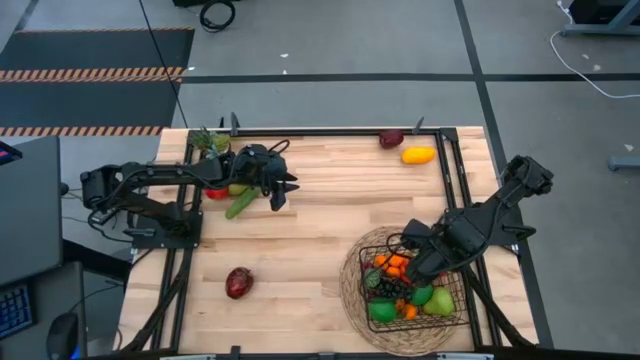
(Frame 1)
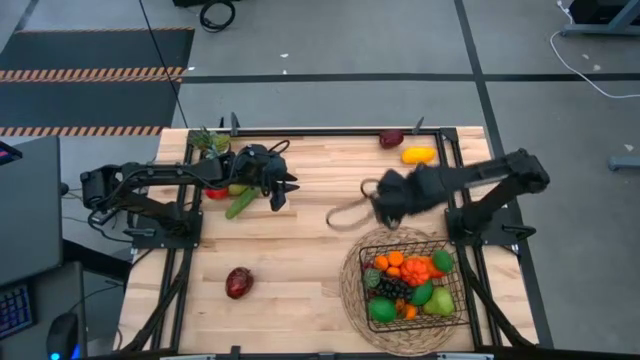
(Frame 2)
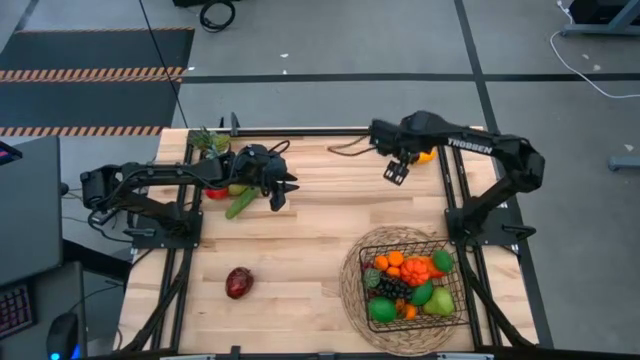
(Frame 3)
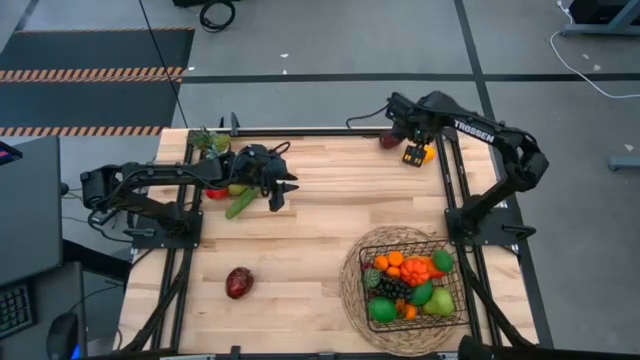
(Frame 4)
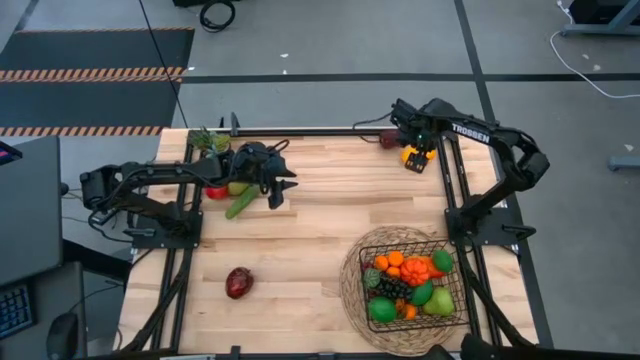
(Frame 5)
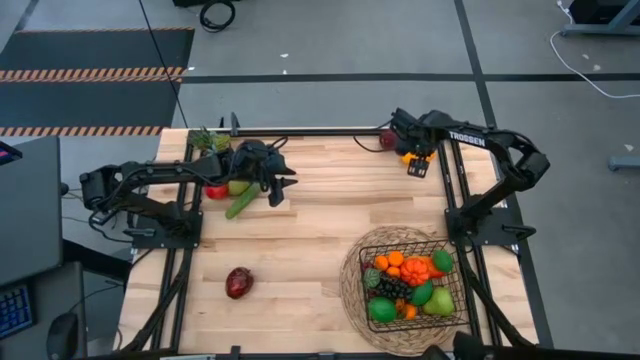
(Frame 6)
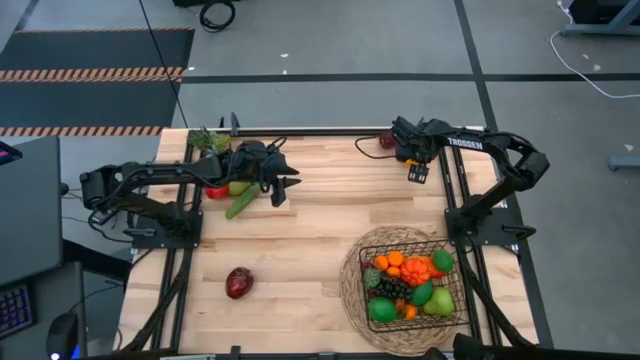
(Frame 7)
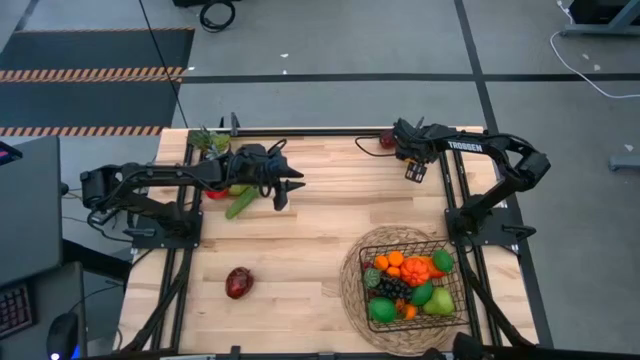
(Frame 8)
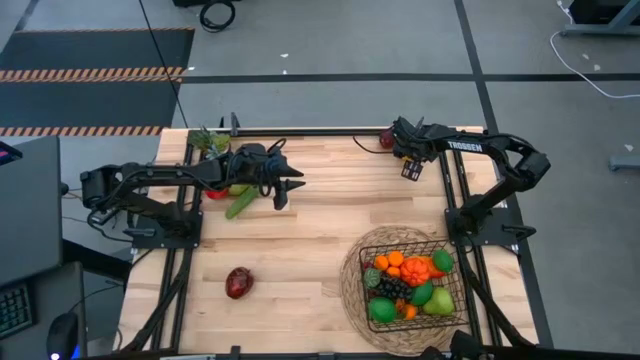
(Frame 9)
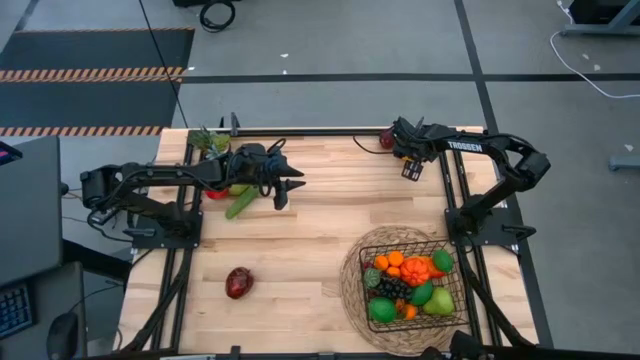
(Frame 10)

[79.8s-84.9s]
Task: Build produce basket
Put the yellow mango into the black wire basket

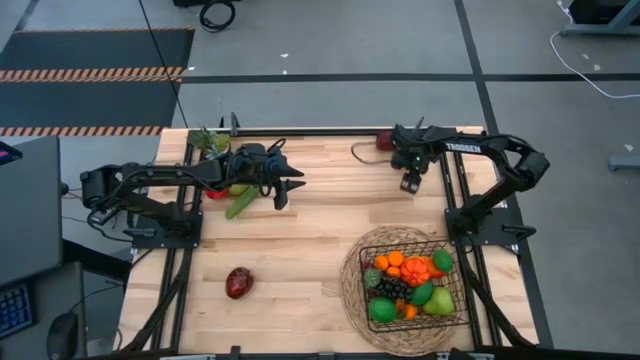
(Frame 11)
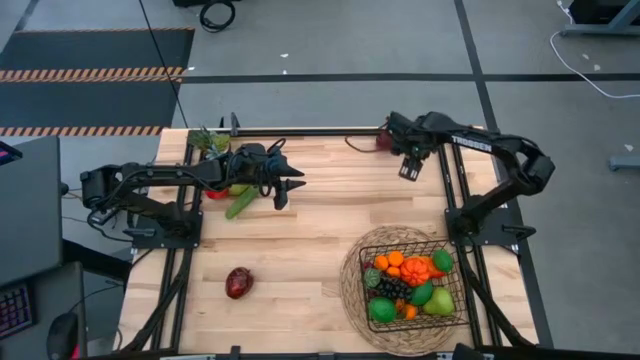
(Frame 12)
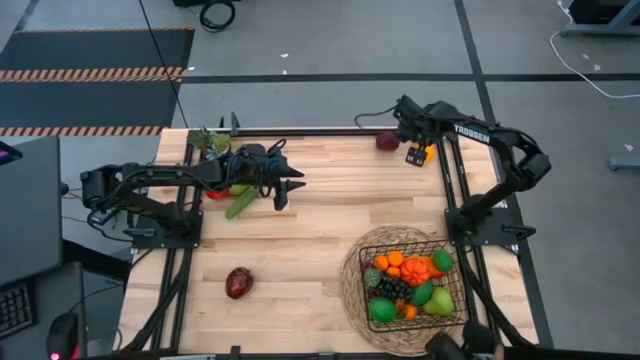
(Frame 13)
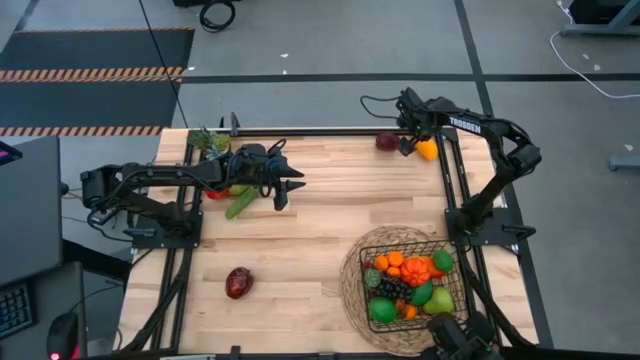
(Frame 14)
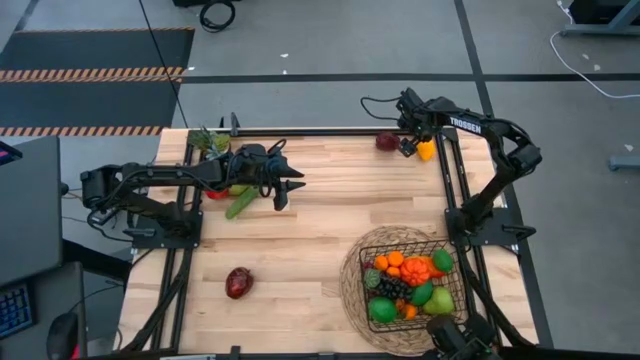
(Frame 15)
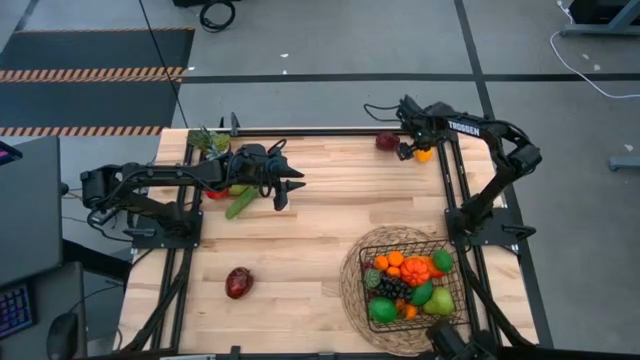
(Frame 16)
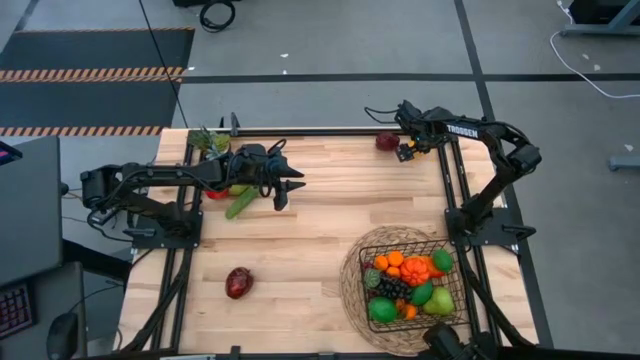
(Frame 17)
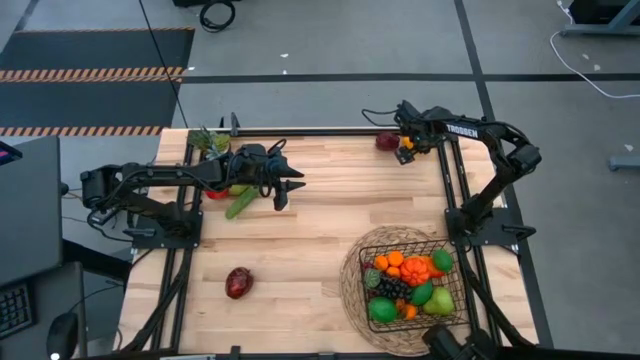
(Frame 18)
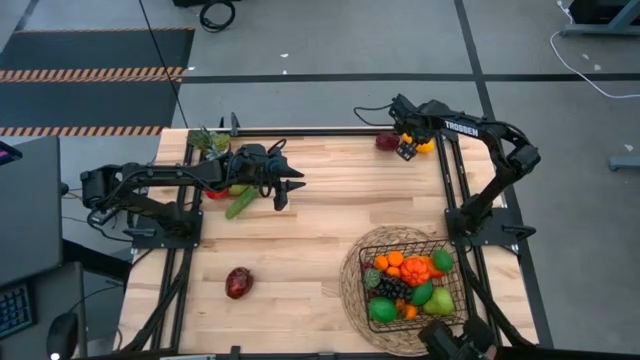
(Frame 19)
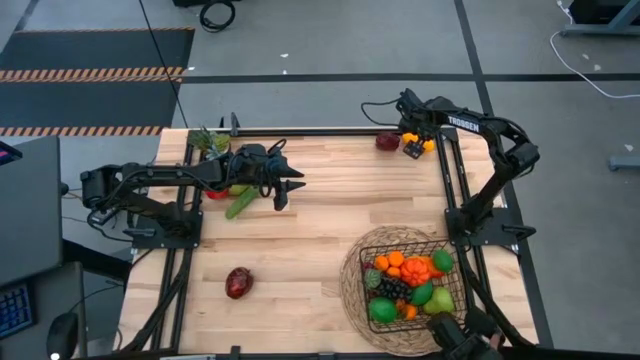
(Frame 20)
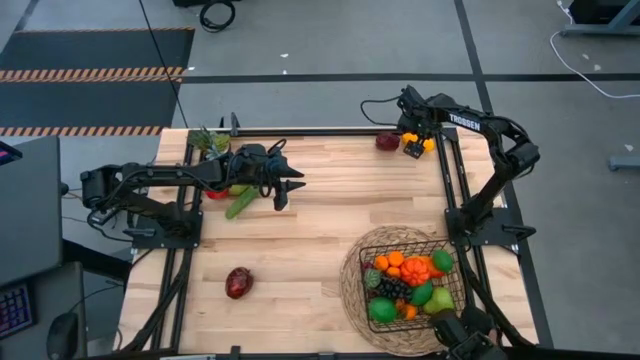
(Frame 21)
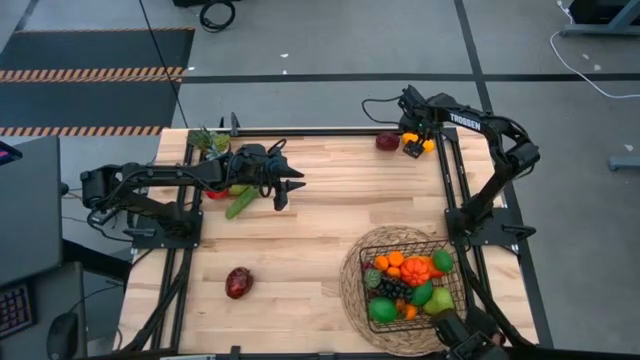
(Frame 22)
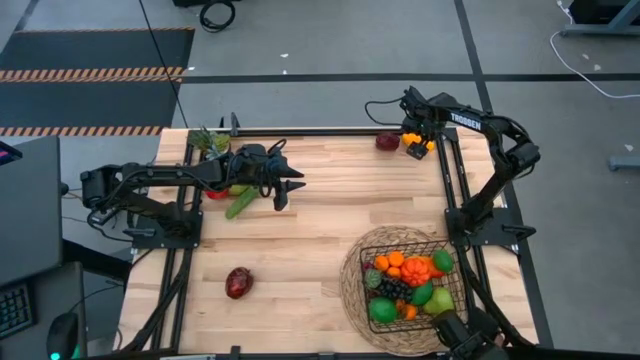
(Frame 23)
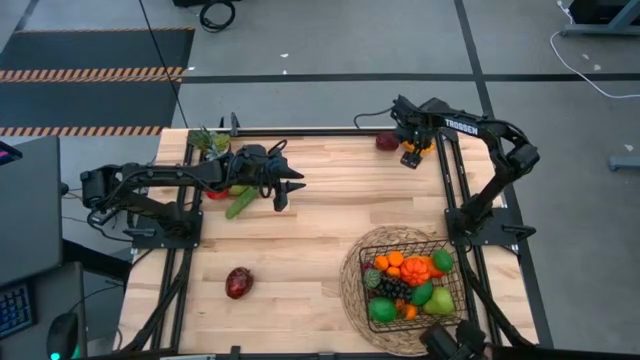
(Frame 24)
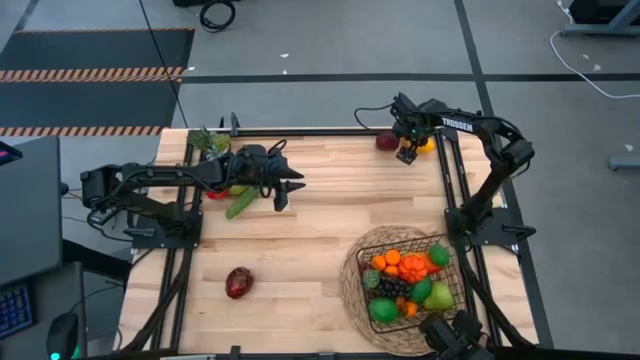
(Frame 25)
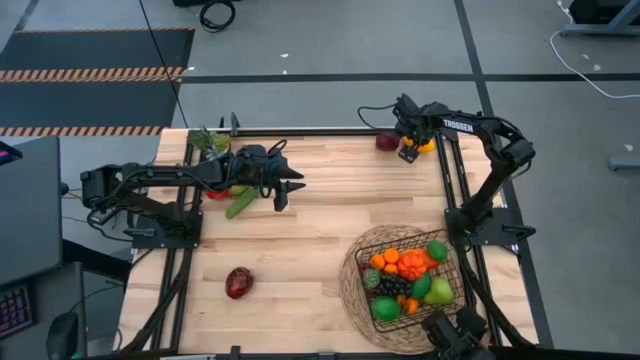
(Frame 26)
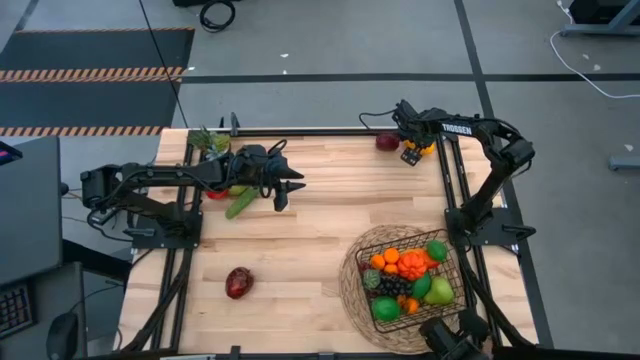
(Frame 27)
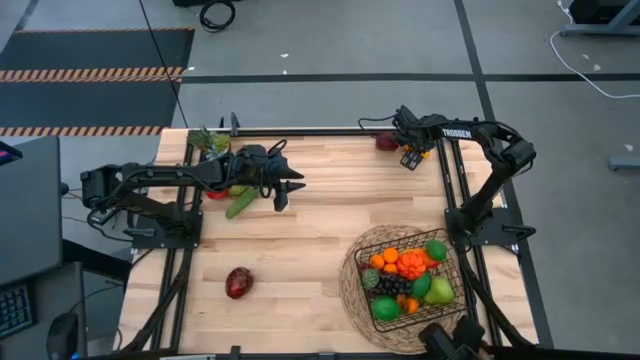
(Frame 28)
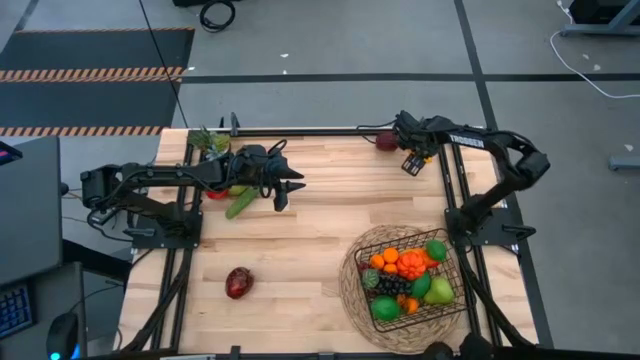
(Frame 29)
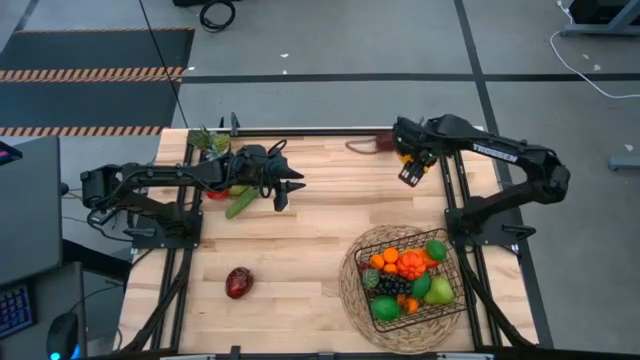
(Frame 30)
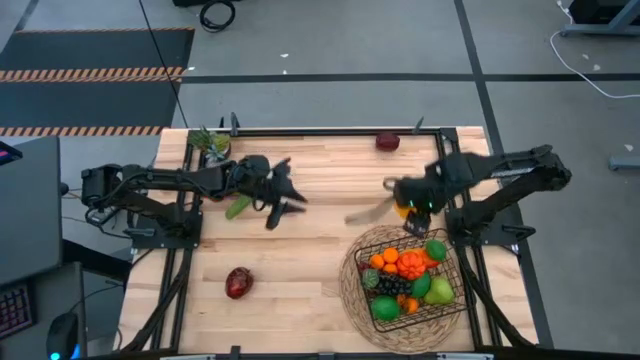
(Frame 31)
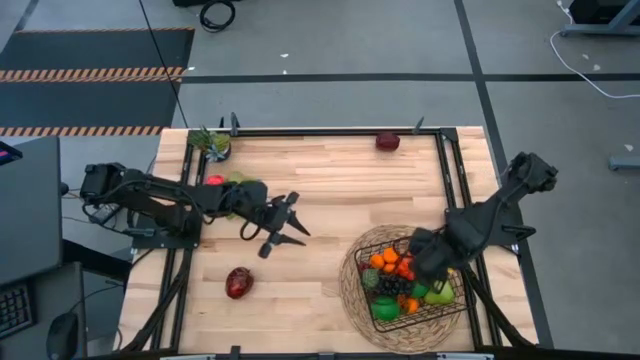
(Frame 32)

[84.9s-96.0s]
Put the yellow mango into the black wire basket

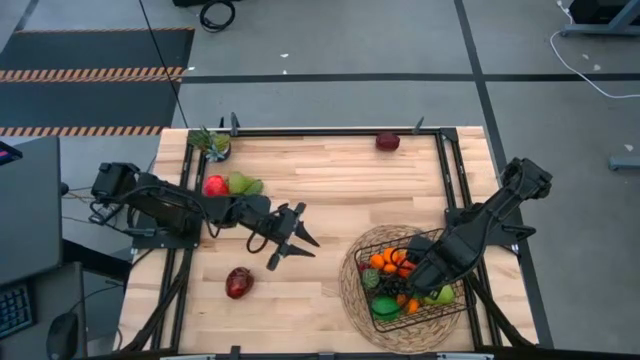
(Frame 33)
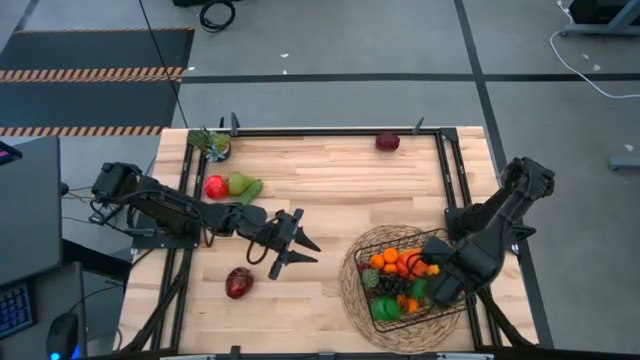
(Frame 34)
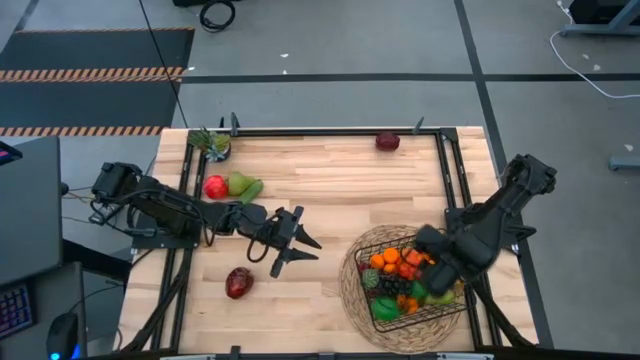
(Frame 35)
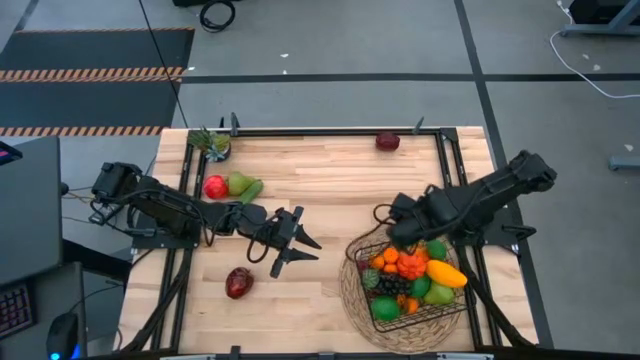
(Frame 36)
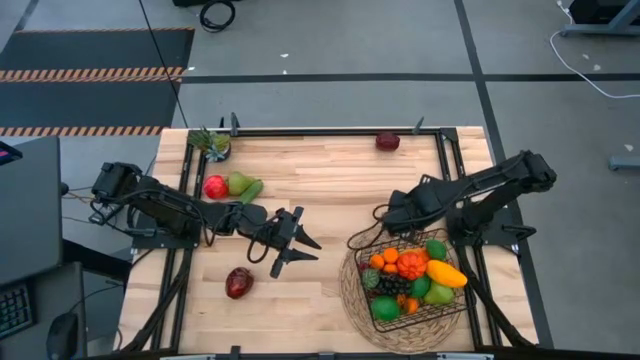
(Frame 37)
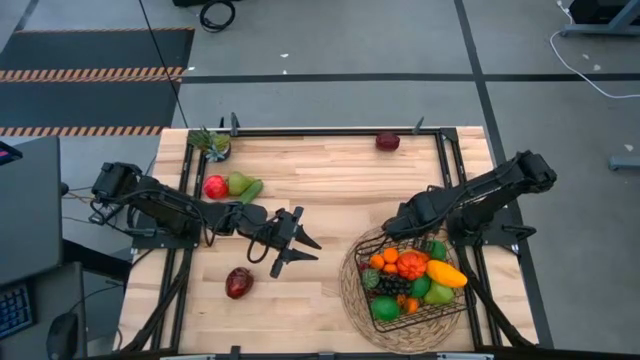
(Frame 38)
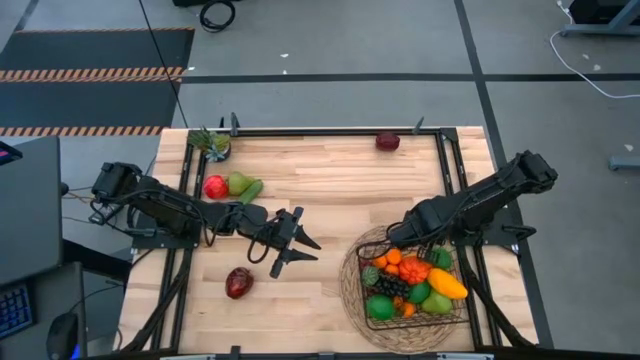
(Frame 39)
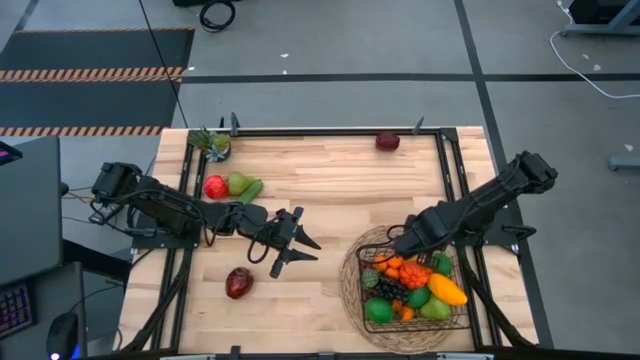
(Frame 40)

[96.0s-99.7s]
Adjust the black wire basket

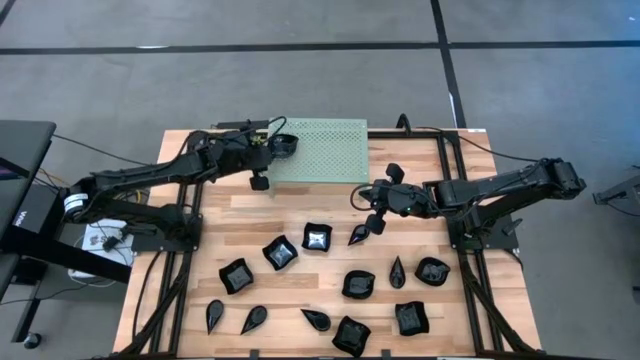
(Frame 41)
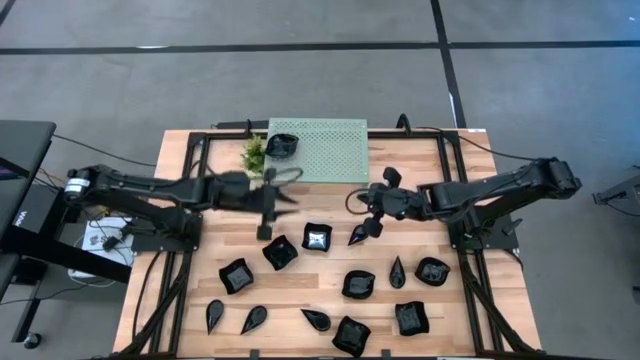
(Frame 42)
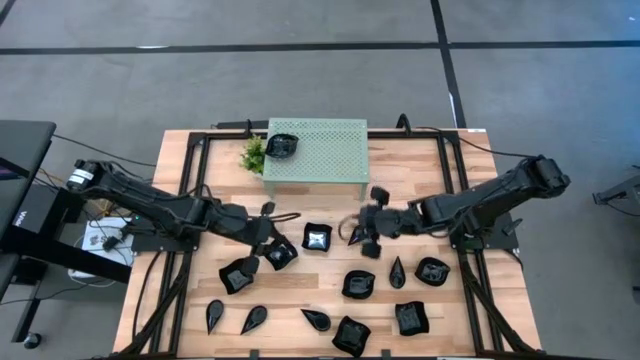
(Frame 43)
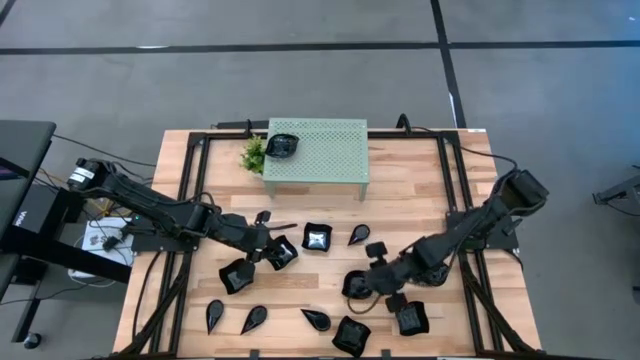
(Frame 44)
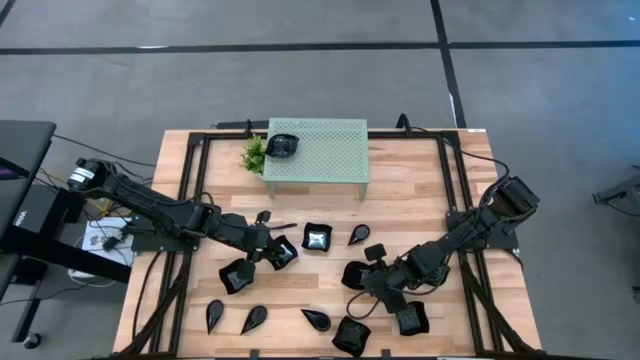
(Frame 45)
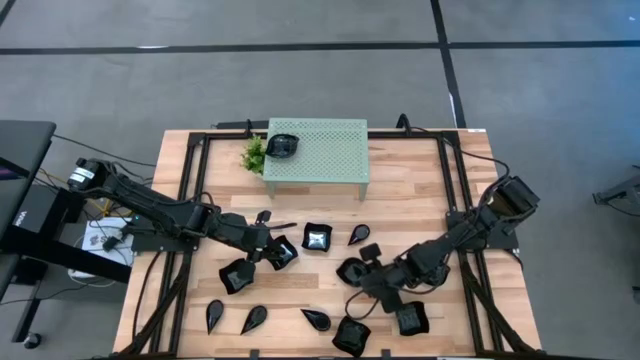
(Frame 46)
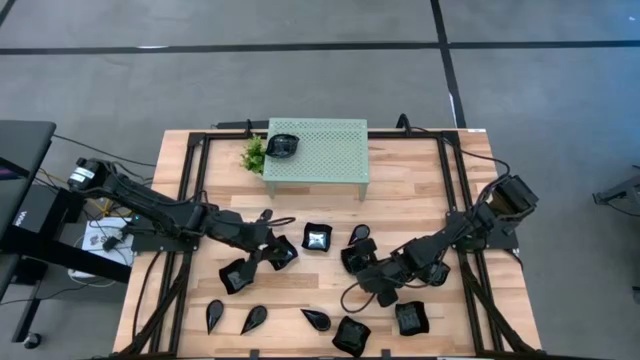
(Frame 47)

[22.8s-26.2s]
Task: Pick & Place Mini shaped plates
Stack the leaf-shaped plate on top of the other leaf-shaped plates on the shelf
